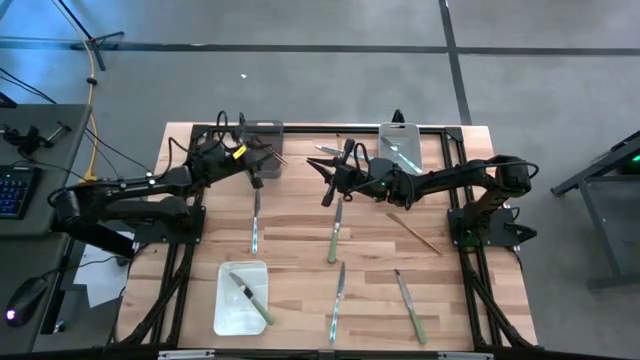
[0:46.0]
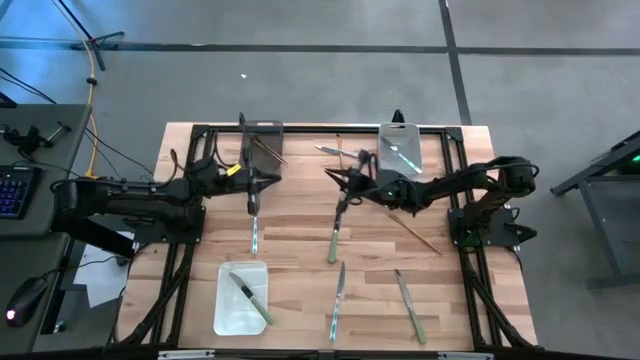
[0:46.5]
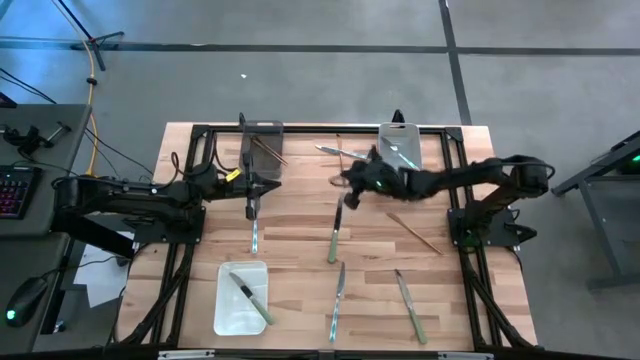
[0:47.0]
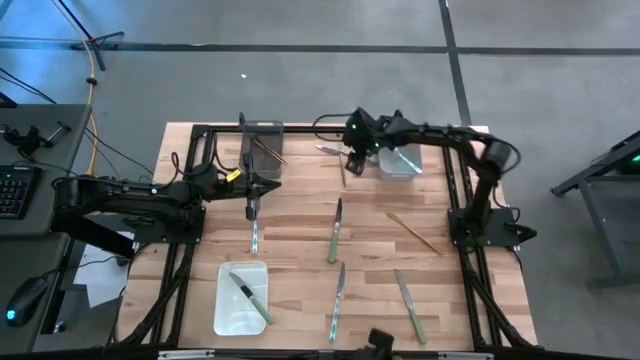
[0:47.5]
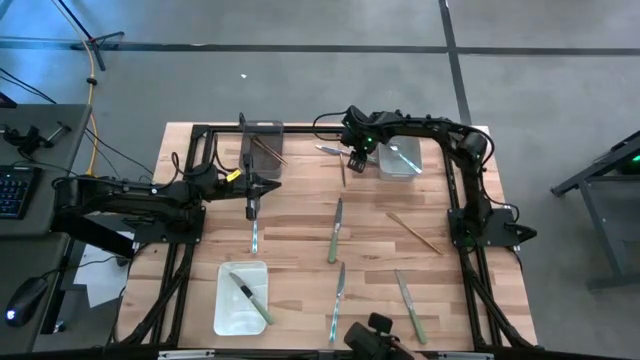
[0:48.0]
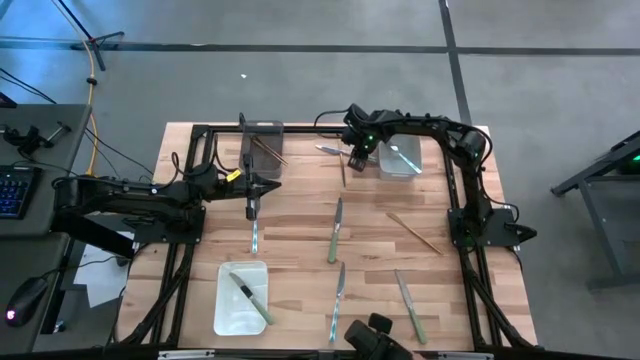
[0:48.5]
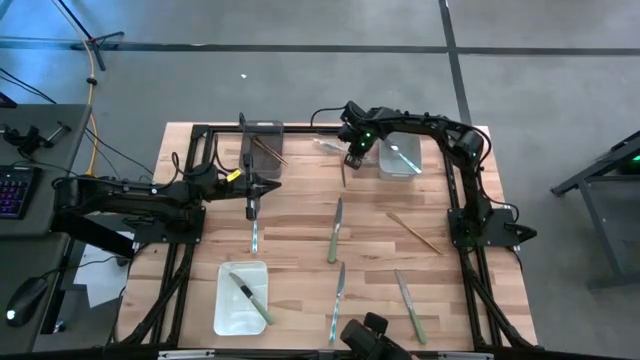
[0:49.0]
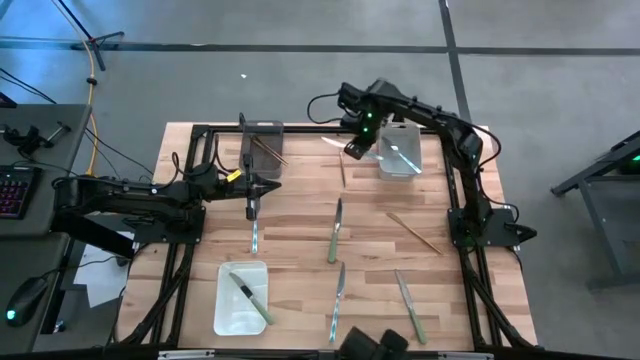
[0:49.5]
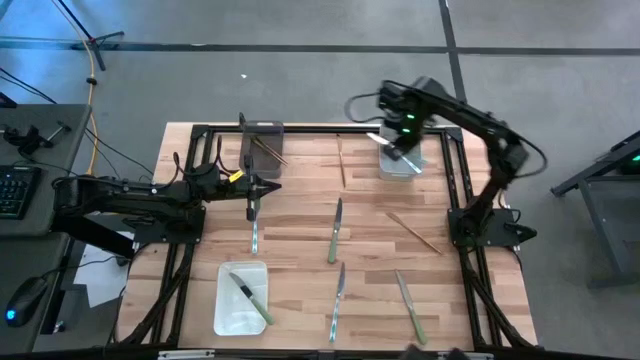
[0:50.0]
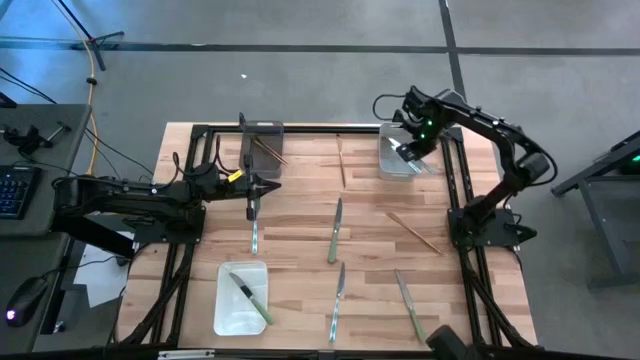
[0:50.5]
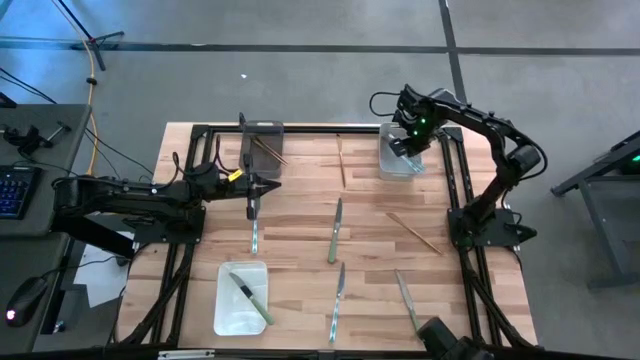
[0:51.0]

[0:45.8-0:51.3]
Task: Sort silverware by color (type)
Put the blue table knife into the gray bin

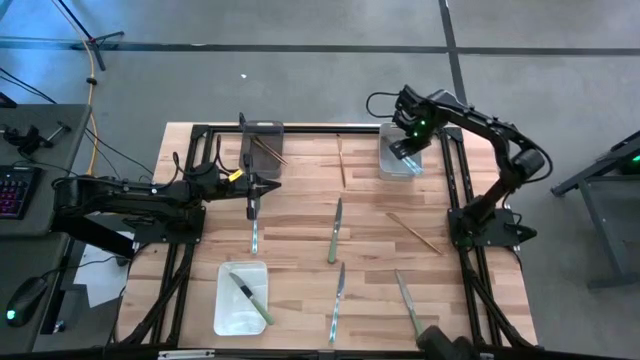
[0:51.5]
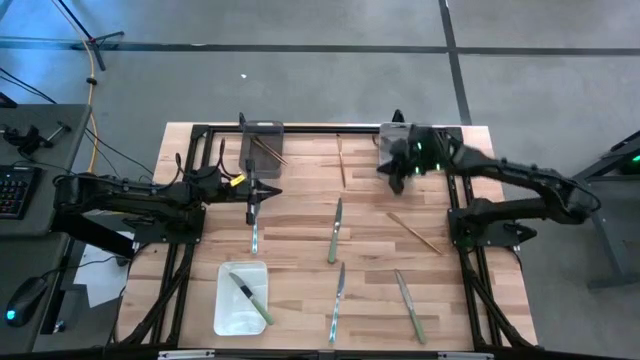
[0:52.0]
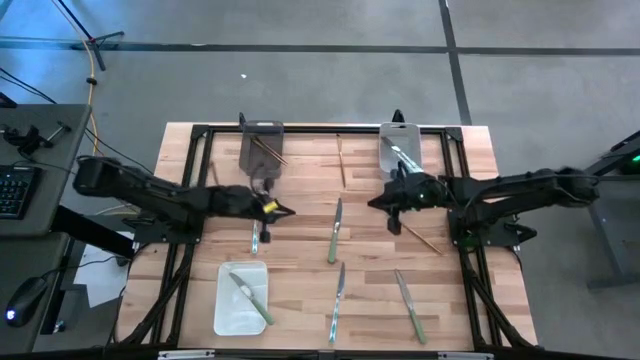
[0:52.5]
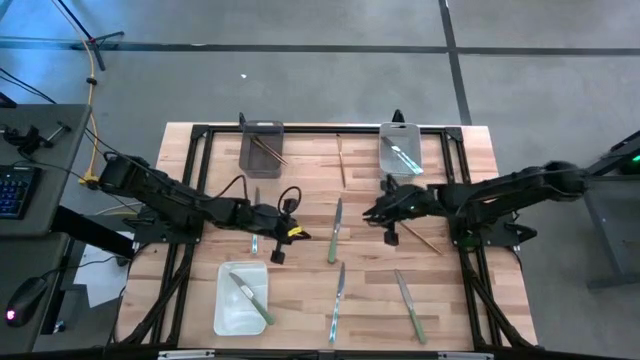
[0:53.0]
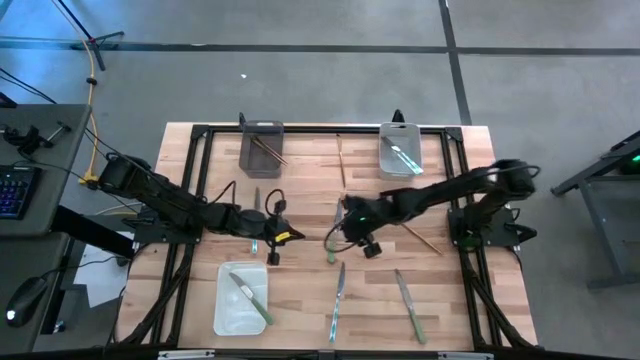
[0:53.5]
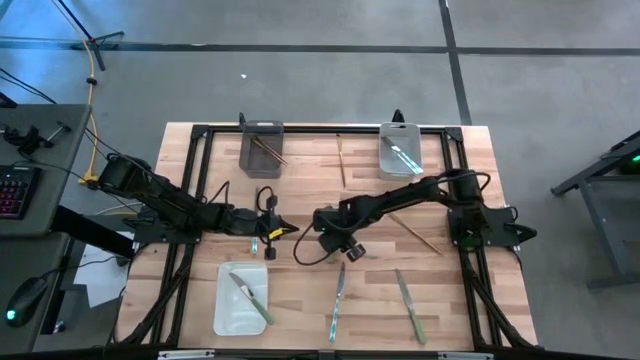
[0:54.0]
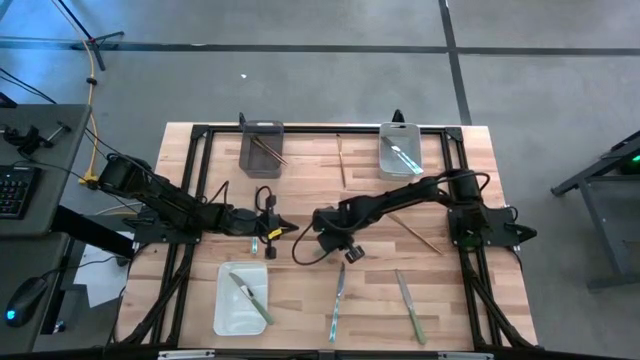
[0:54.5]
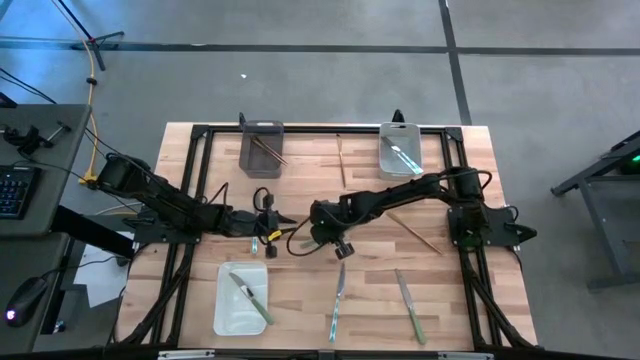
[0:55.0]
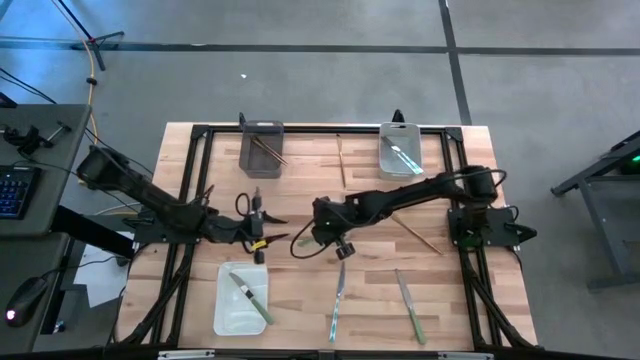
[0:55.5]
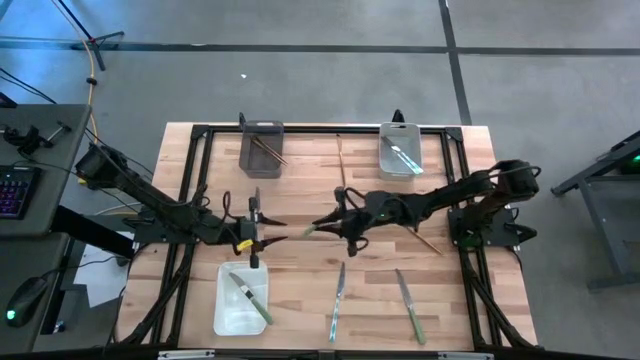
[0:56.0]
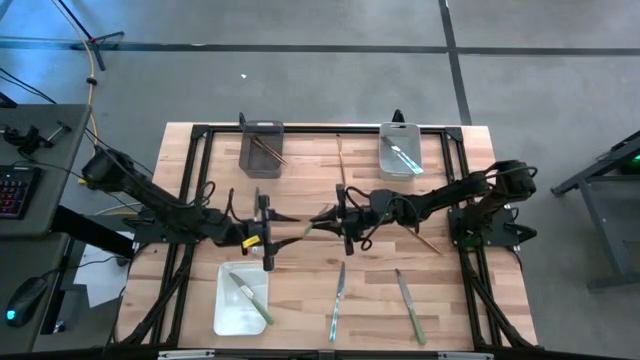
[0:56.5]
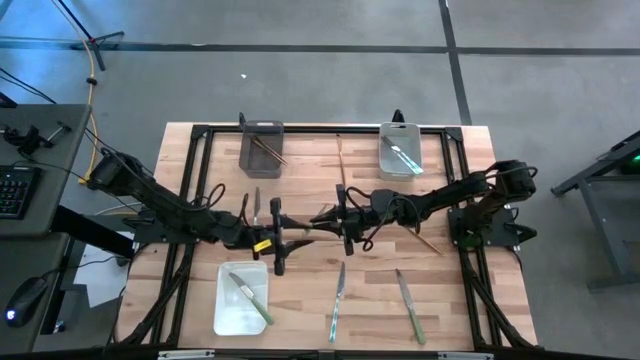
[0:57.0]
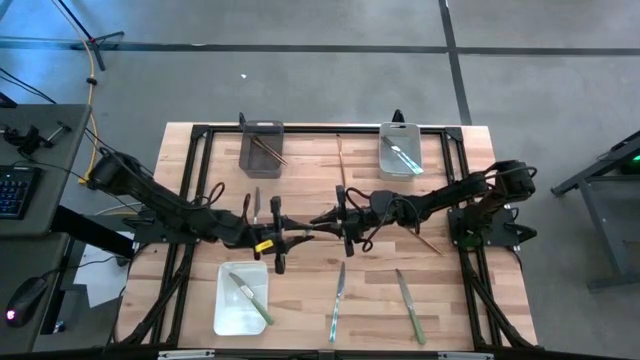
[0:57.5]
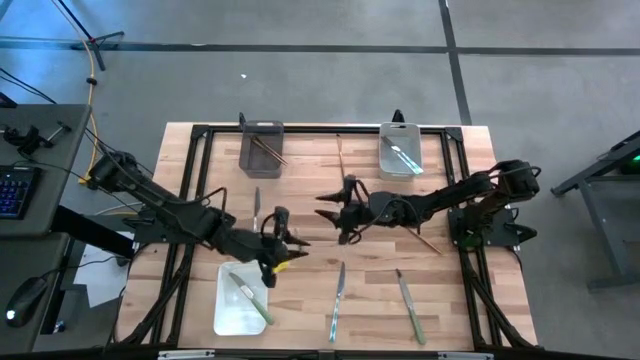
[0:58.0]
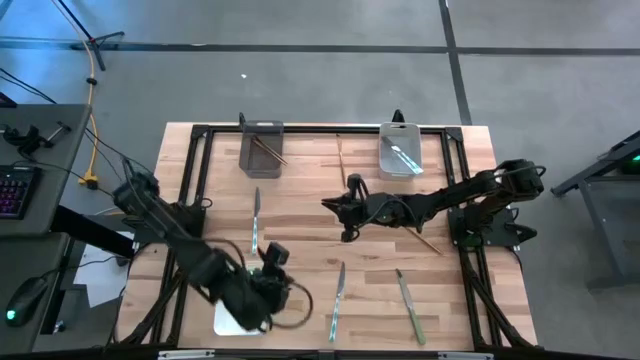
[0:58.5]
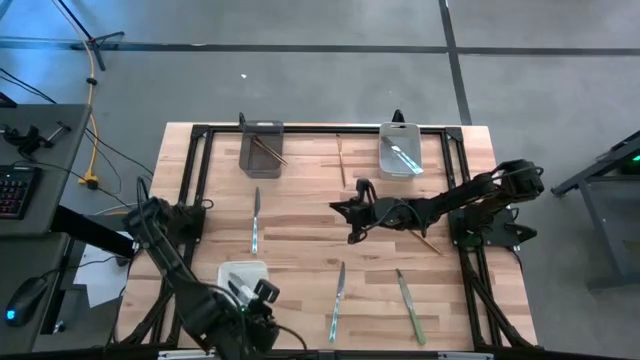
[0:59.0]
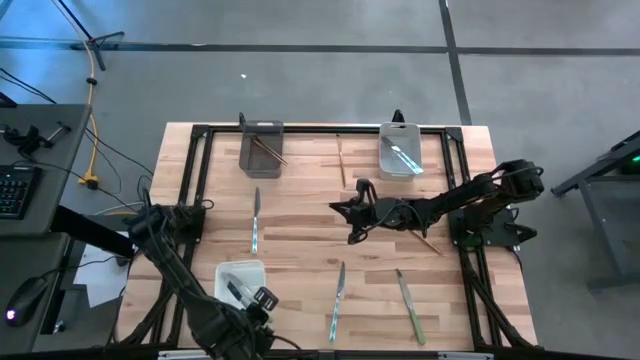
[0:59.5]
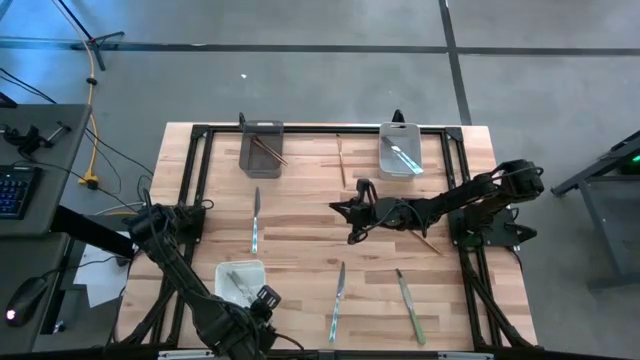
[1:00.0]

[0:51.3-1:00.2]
Put the top green table knife into the white bin

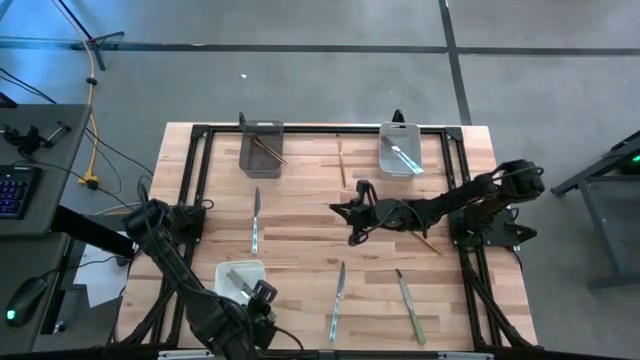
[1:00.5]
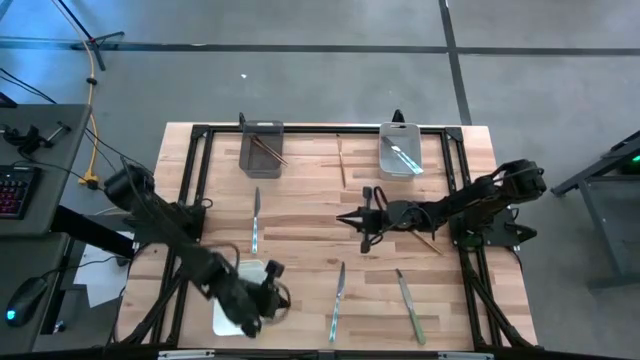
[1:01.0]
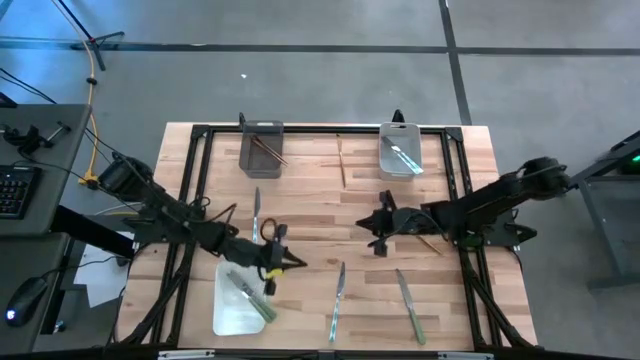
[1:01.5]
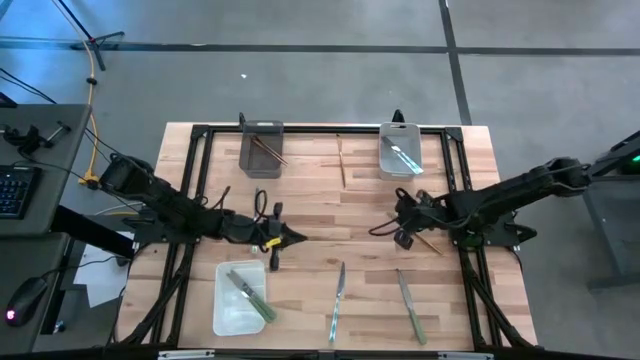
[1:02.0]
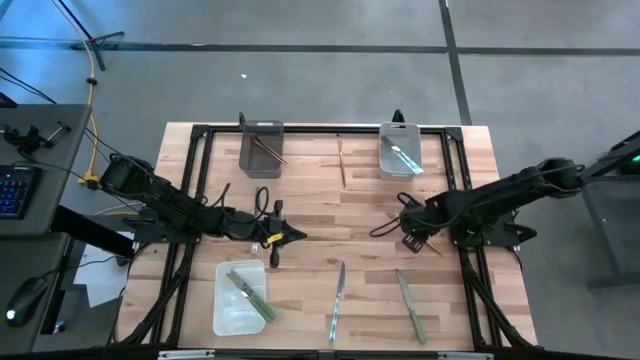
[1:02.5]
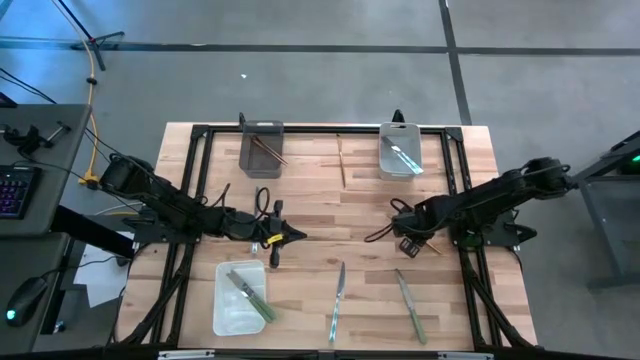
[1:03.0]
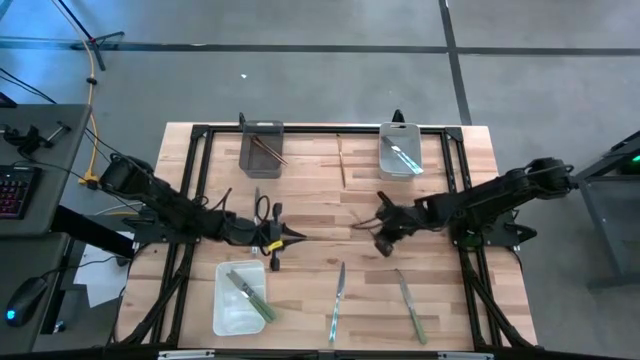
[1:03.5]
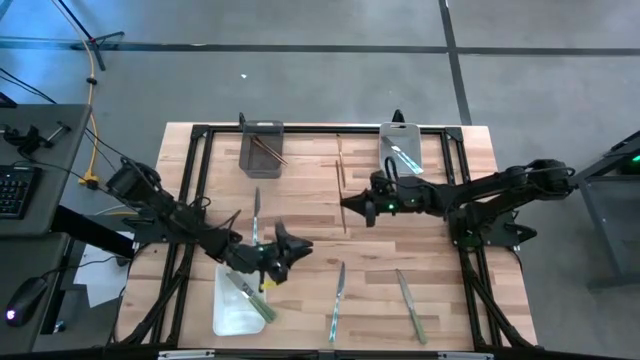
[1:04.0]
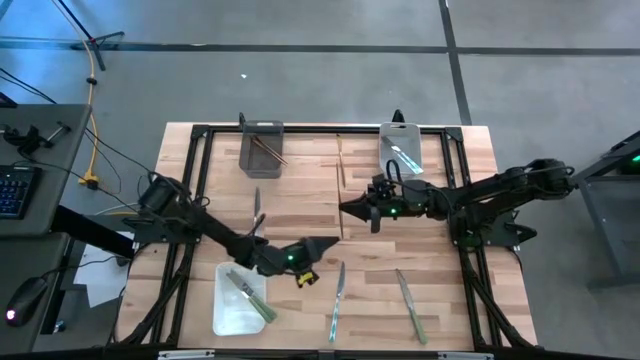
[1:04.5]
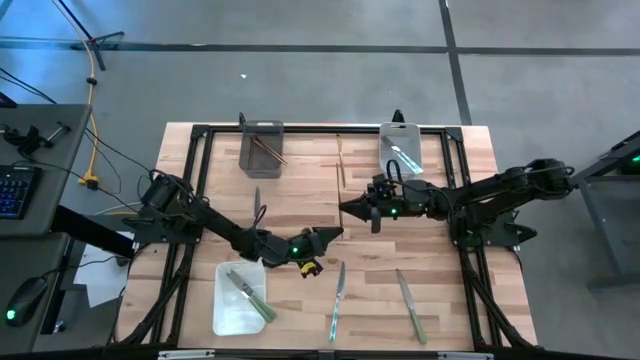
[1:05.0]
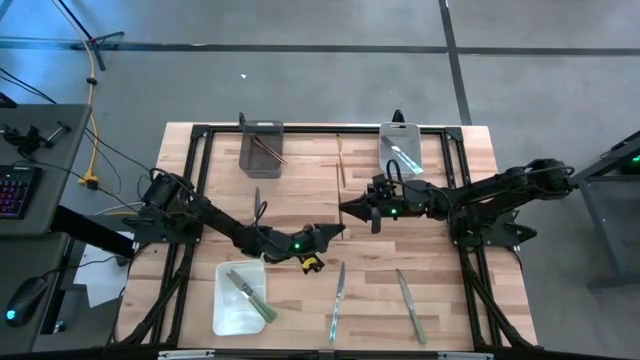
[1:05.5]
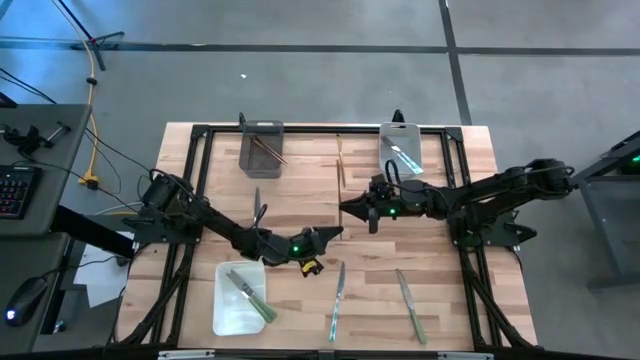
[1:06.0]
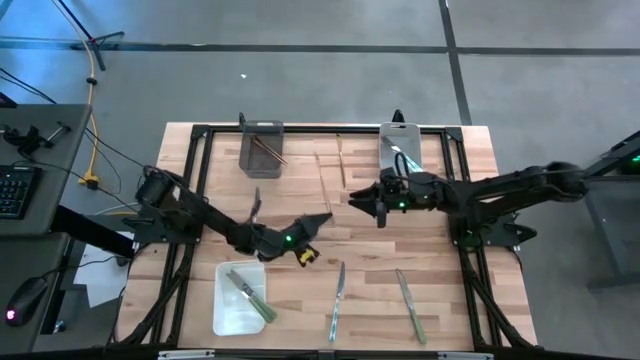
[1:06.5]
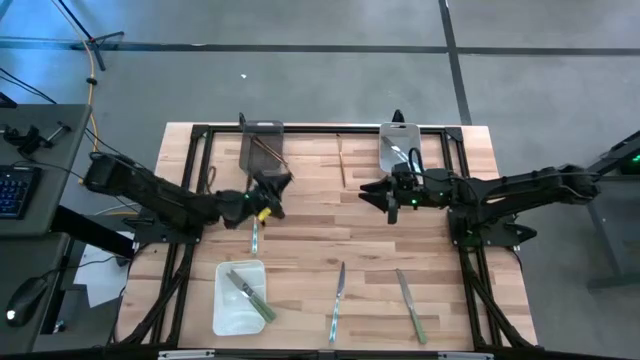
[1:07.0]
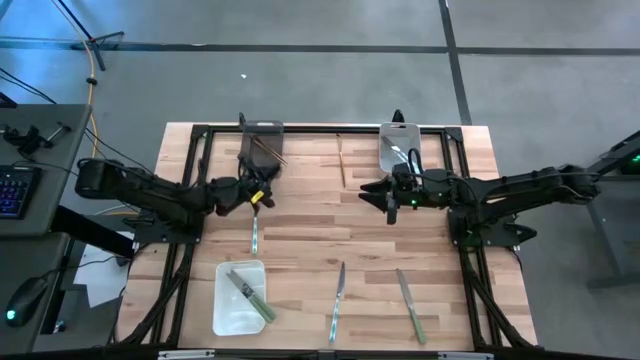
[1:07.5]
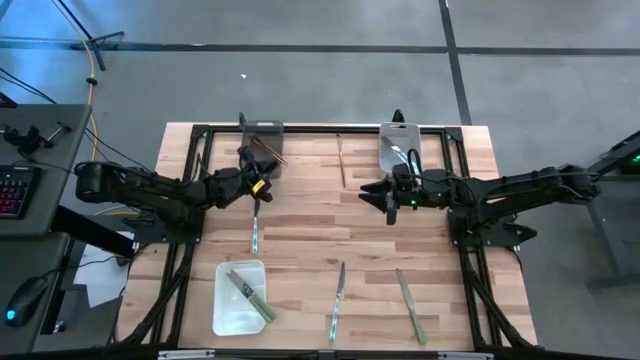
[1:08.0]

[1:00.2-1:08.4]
Put the gold table knife into the black bin
